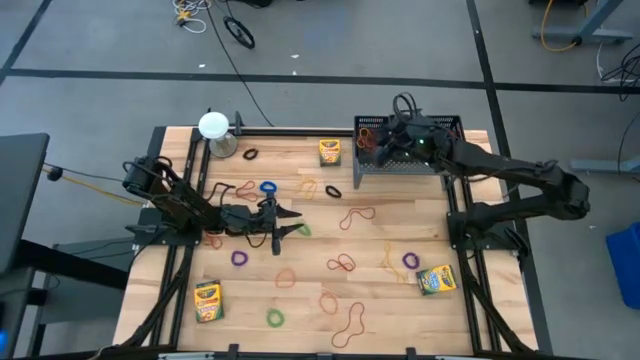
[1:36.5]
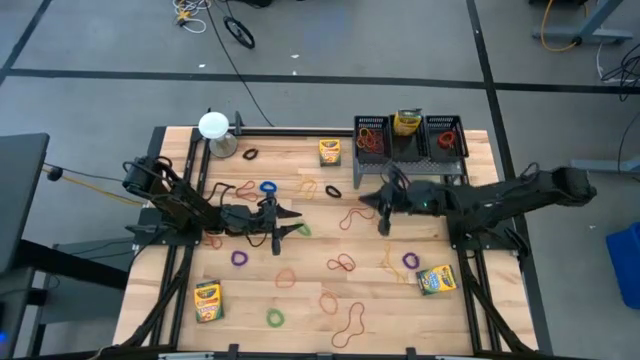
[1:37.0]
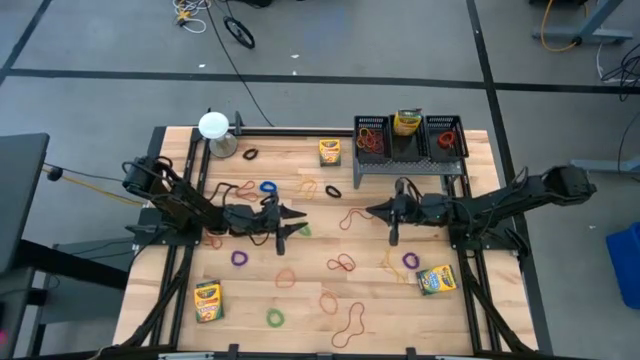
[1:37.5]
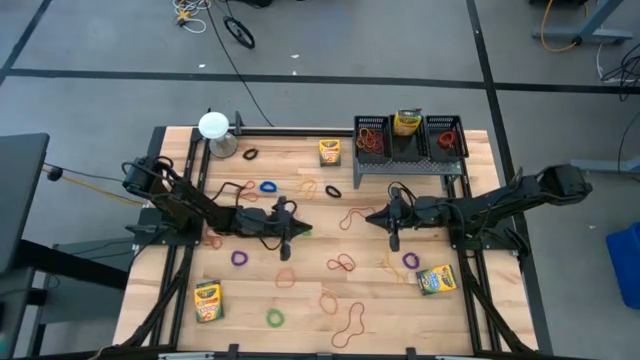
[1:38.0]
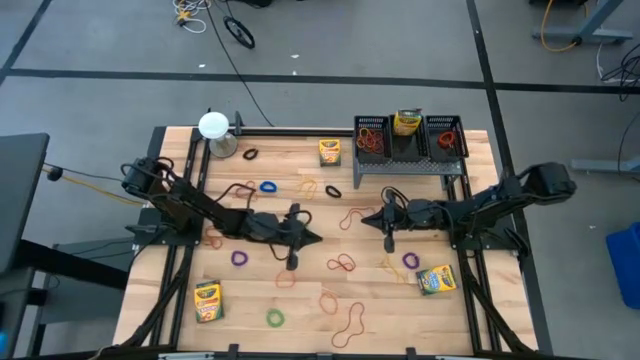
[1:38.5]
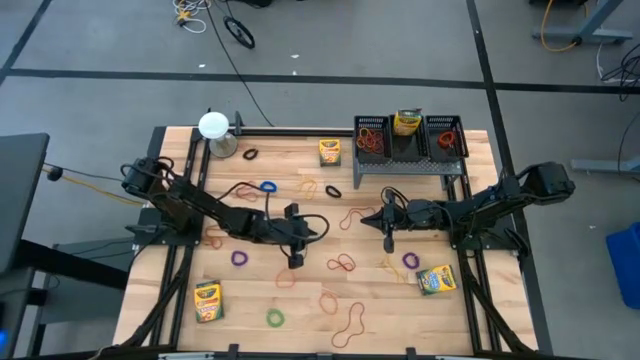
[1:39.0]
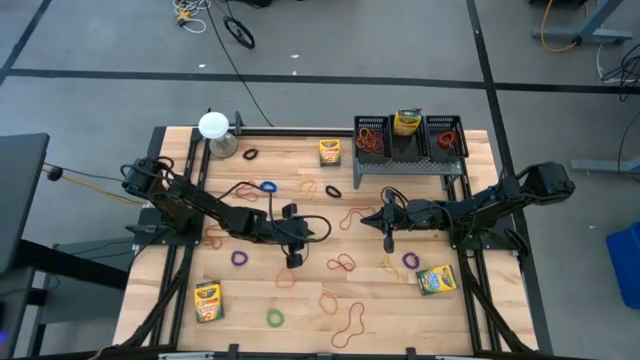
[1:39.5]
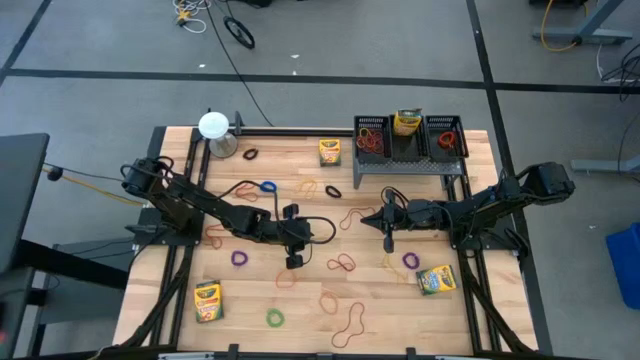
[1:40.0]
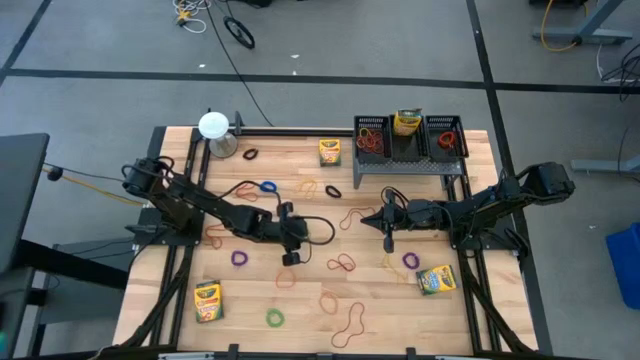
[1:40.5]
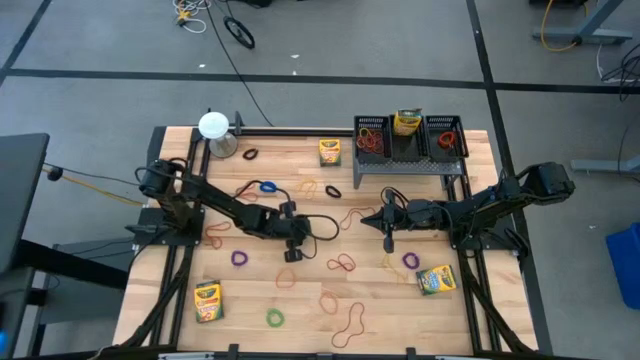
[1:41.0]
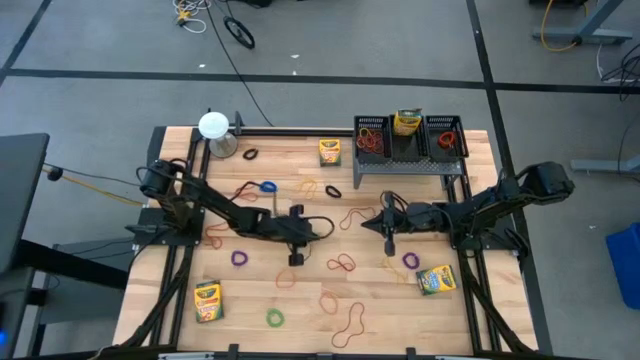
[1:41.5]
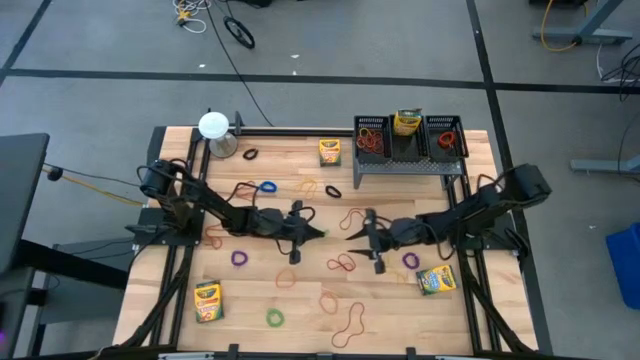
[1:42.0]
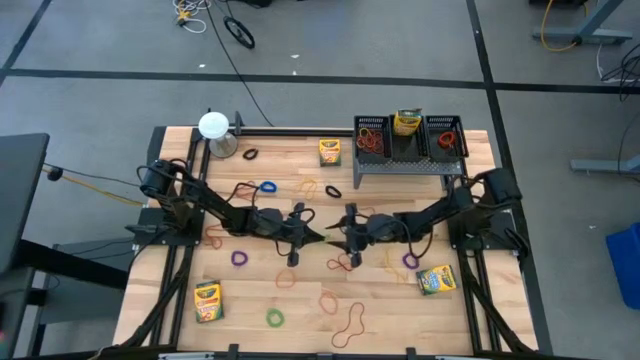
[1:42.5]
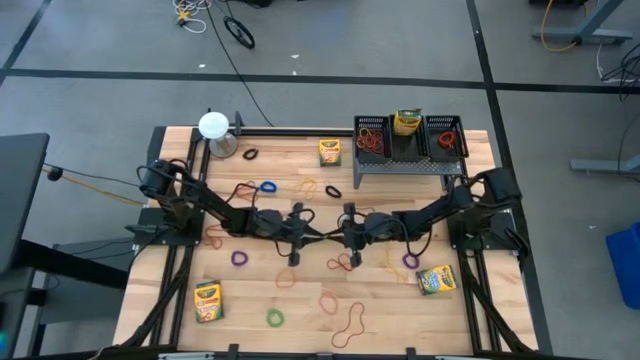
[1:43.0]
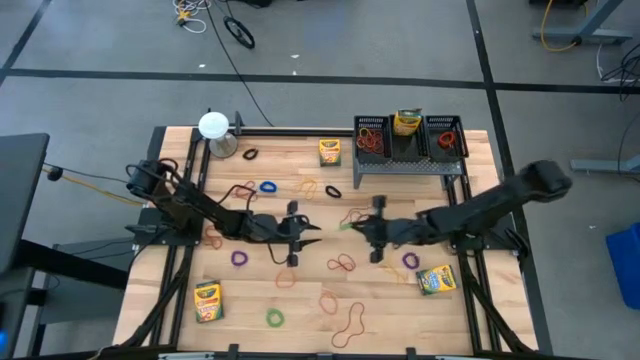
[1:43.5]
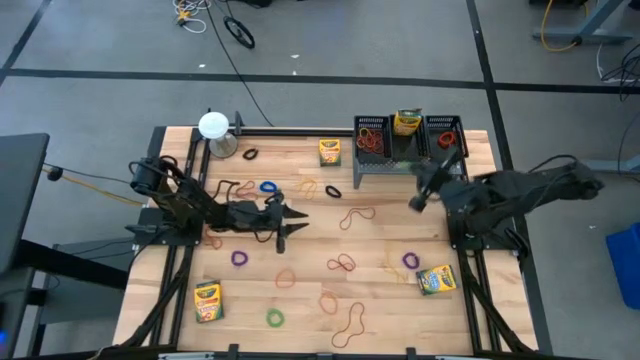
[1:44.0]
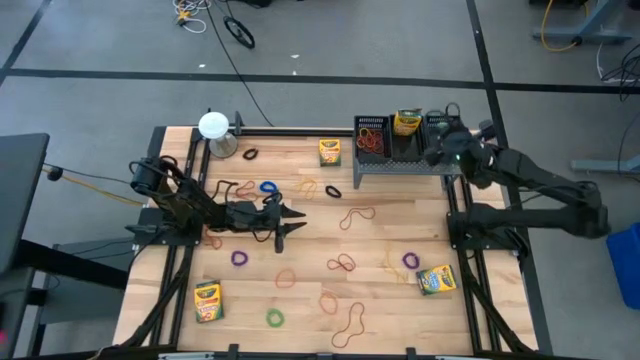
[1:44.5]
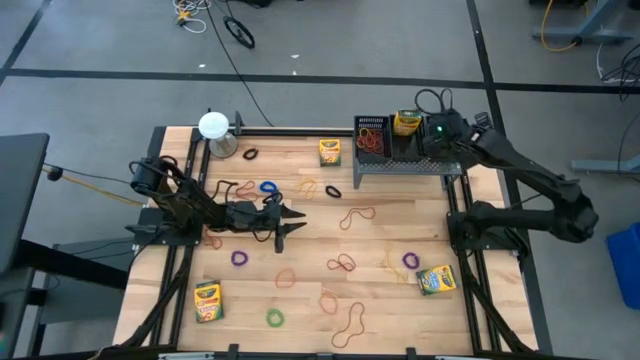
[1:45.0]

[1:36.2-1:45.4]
Task: Pick & Place Office Desk Supplies
Put the green spring keychain into the right black bin on the shelf

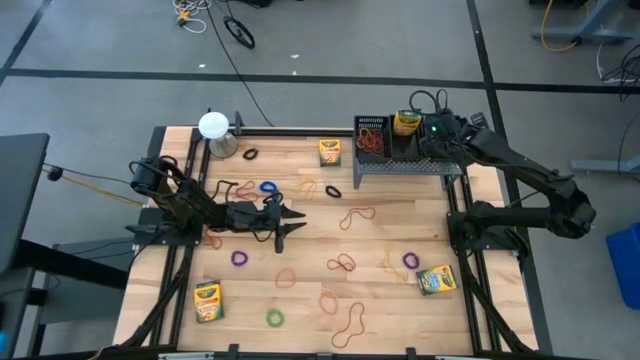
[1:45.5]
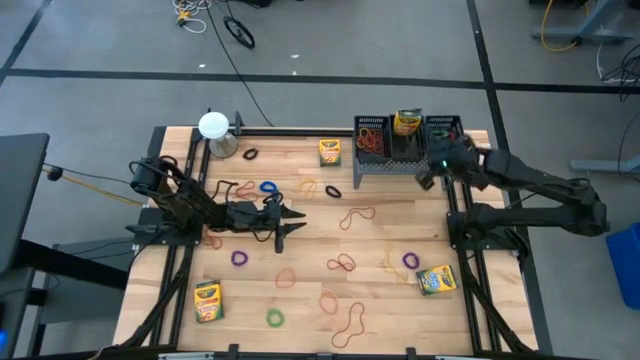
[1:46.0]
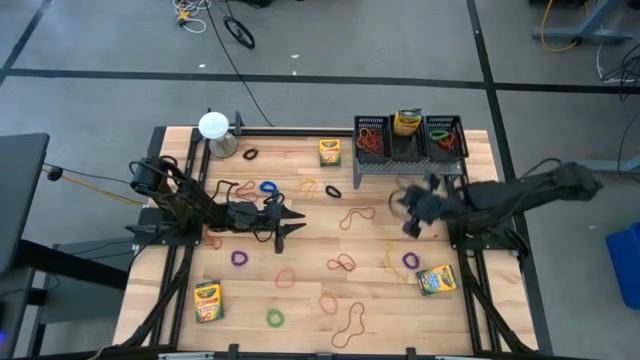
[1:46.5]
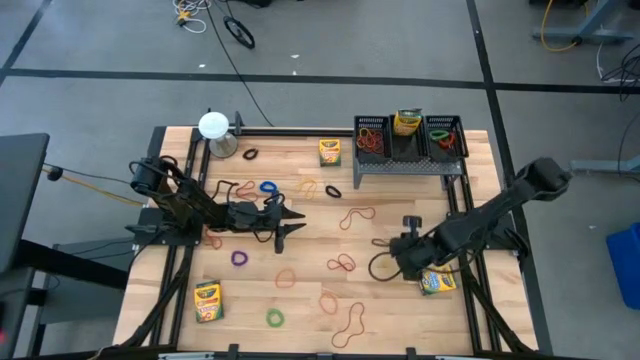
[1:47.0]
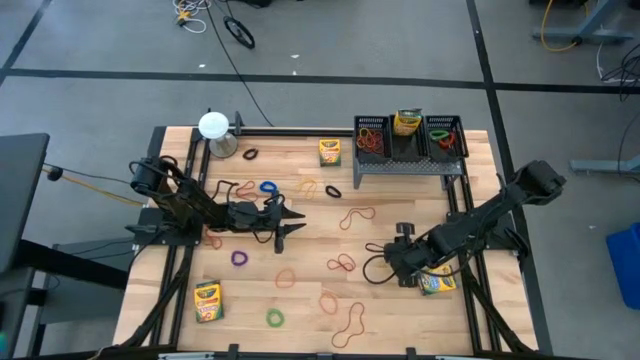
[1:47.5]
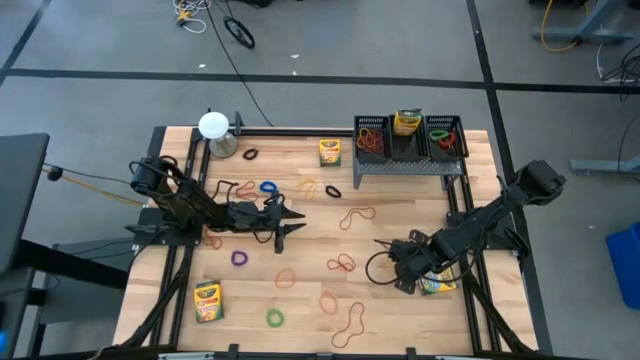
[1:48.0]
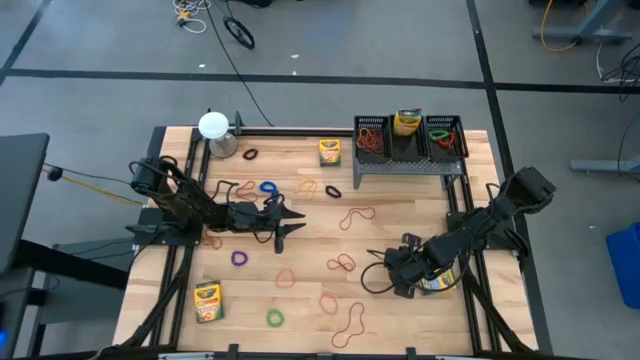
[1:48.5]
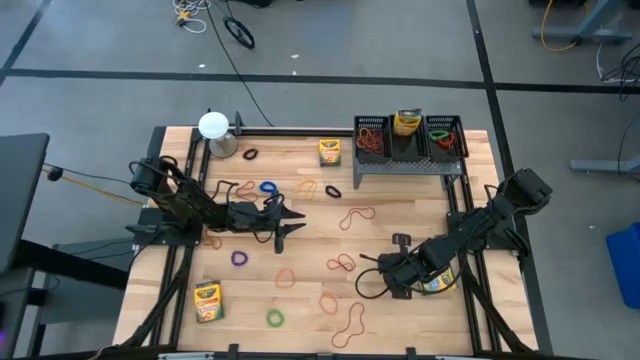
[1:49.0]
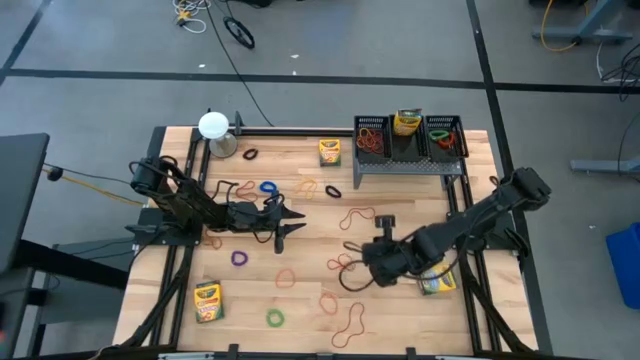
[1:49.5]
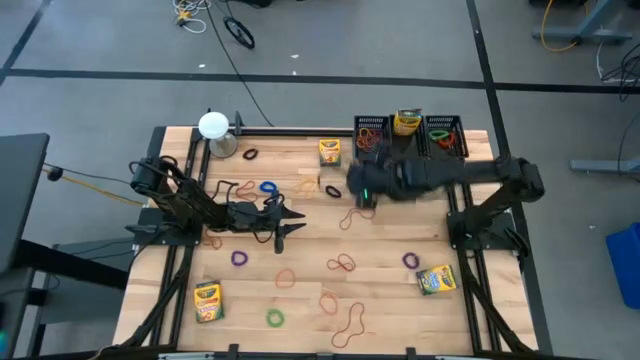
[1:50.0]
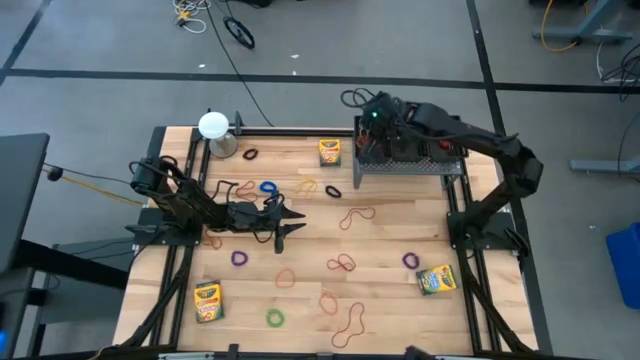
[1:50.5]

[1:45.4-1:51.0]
Put the yellow rubber band into the left black bin on the shelf

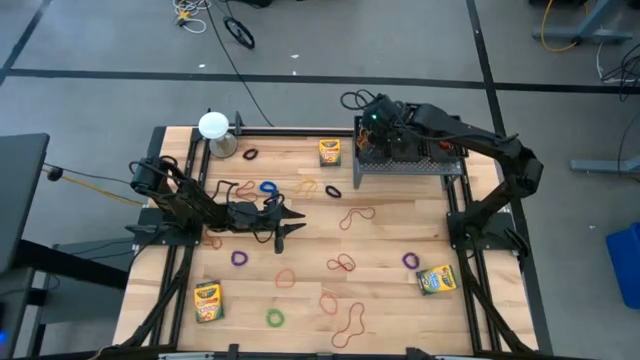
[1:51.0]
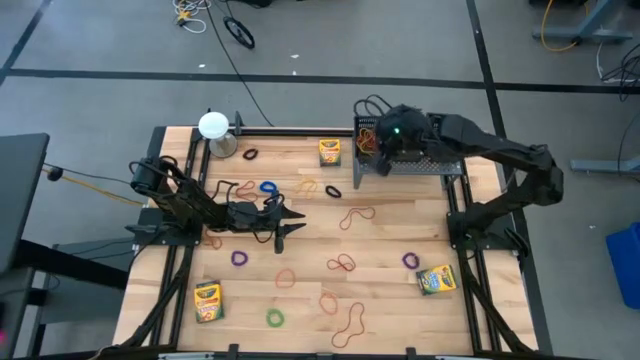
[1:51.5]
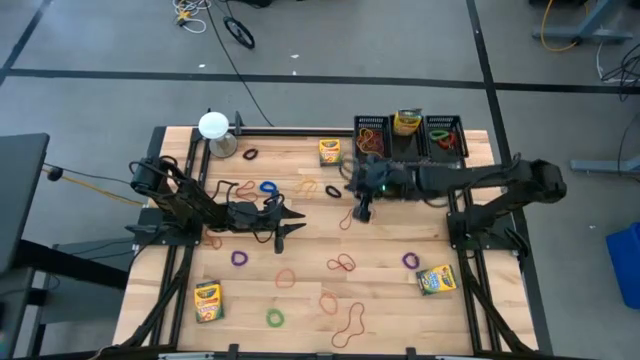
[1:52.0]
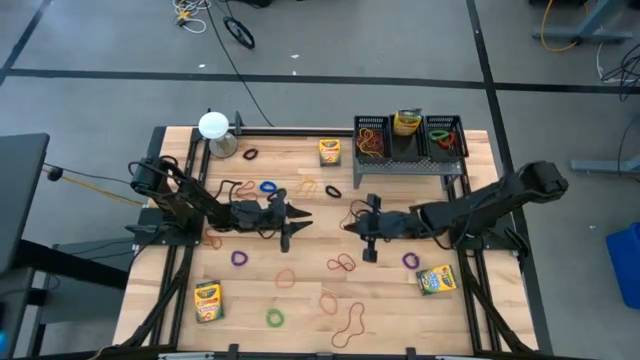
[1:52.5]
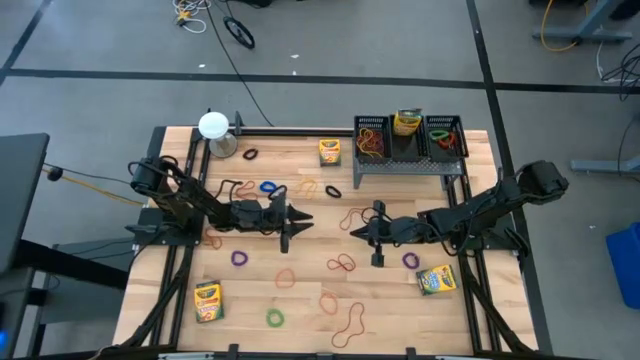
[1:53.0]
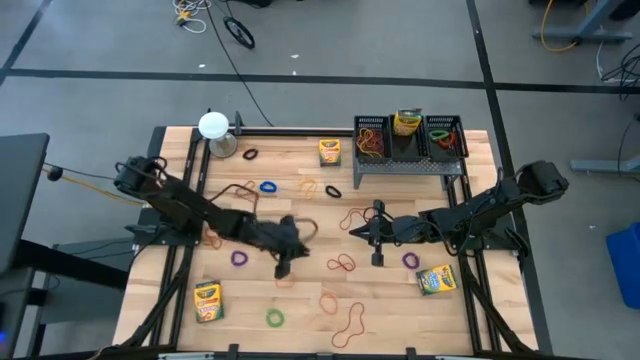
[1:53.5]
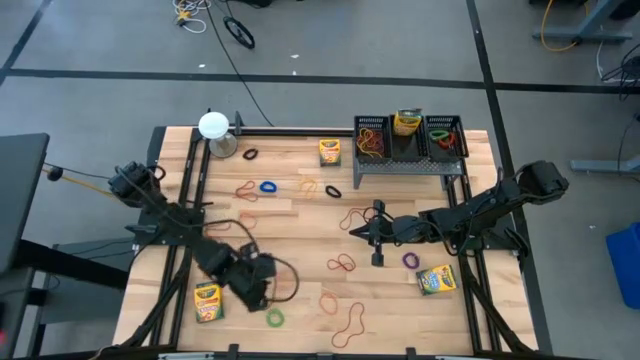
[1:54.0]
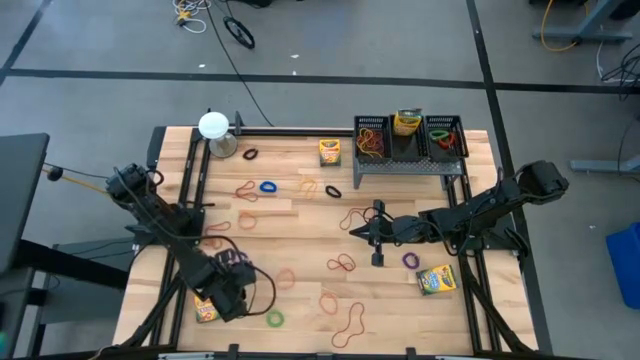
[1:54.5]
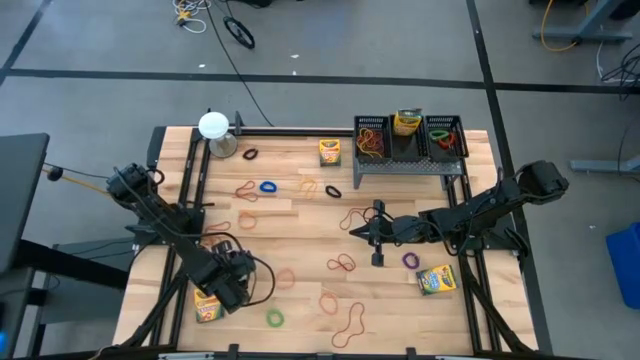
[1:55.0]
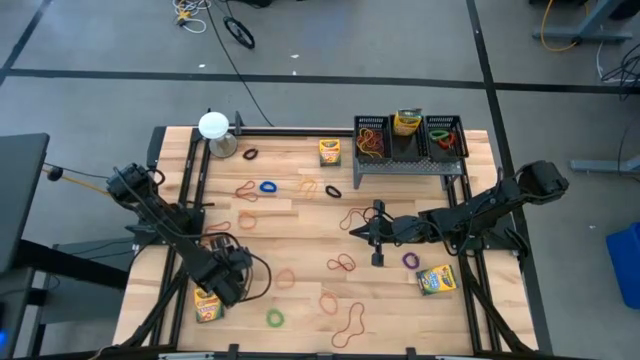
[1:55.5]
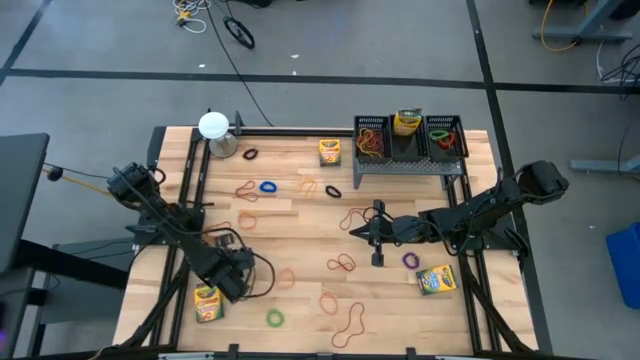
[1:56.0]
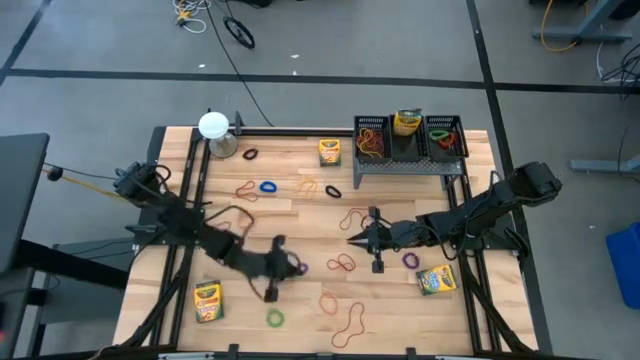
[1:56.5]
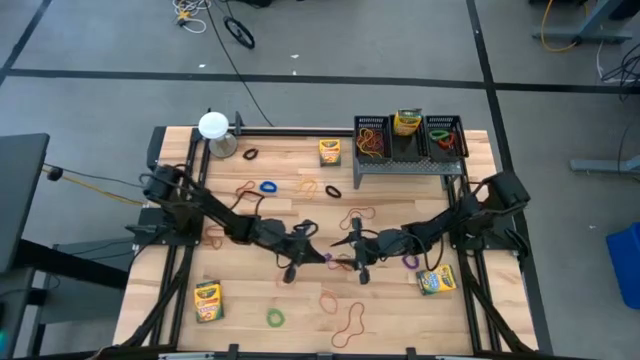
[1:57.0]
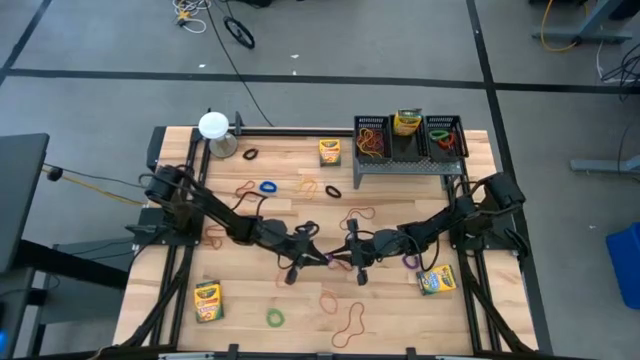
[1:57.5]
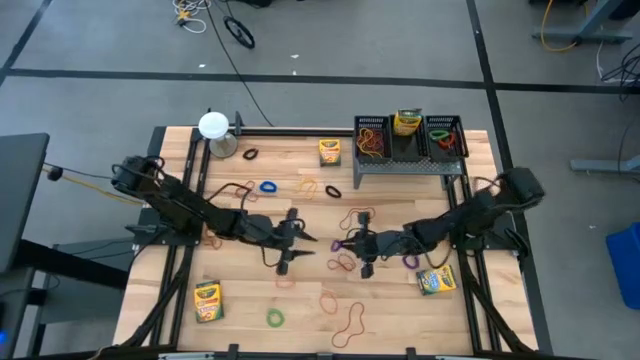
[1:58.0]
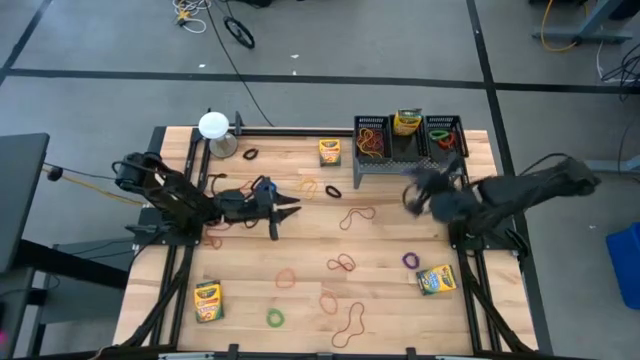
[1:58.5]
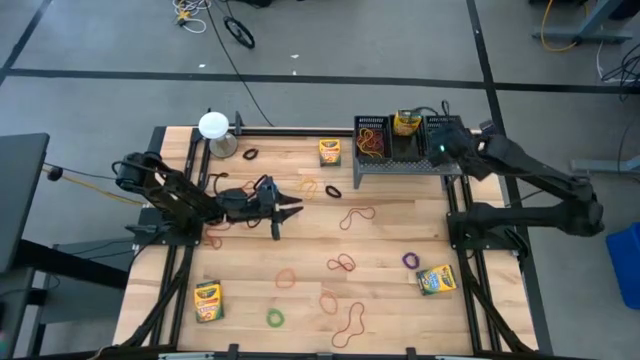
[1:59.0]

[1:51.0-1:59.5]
Put the purple spring keychain into the right black bin on the shelf
